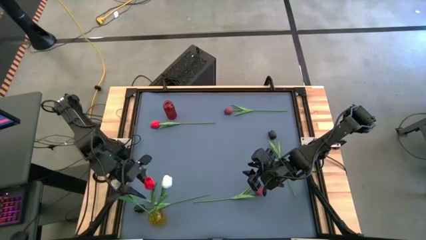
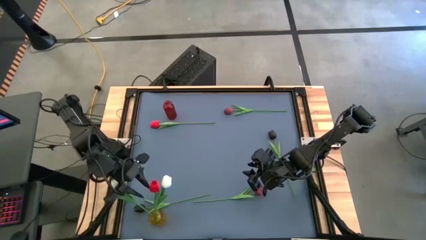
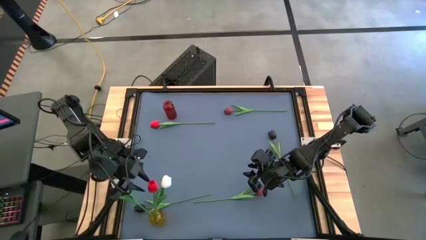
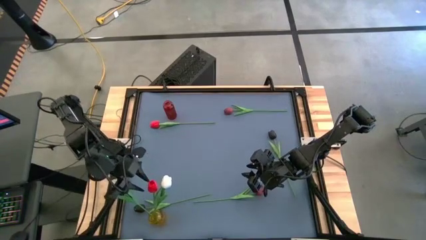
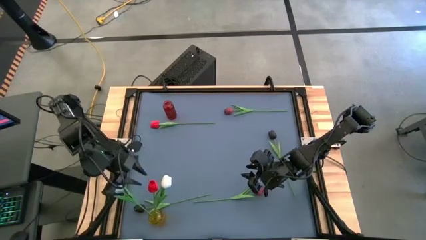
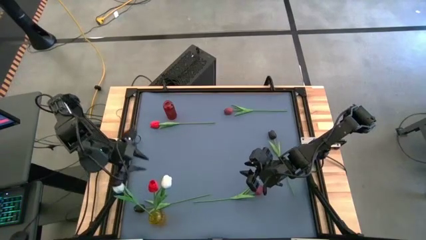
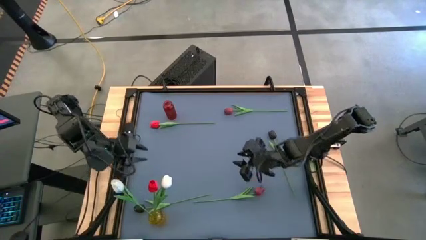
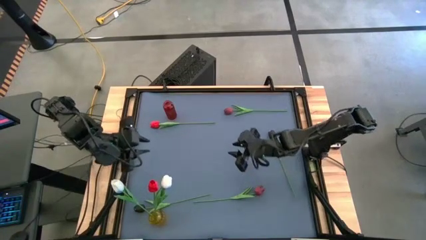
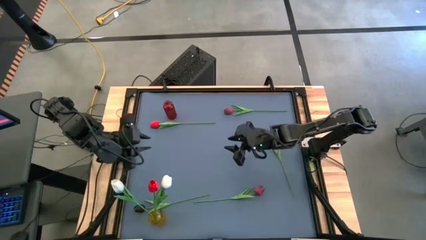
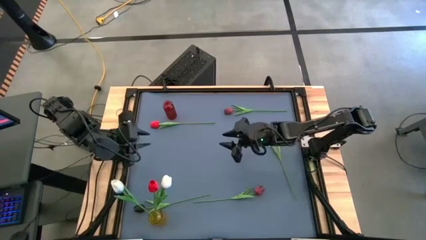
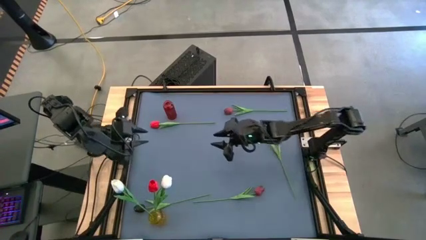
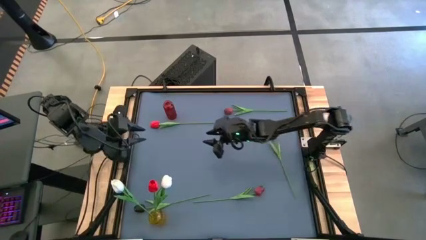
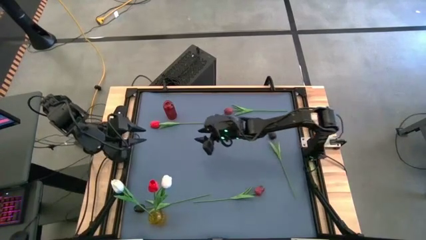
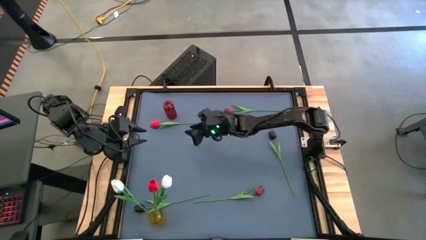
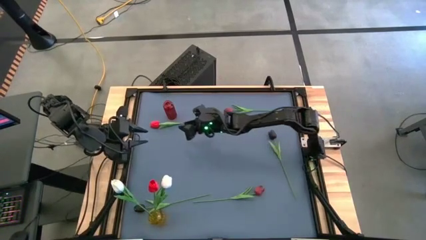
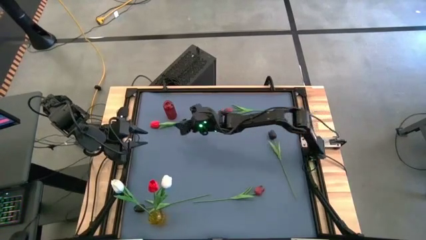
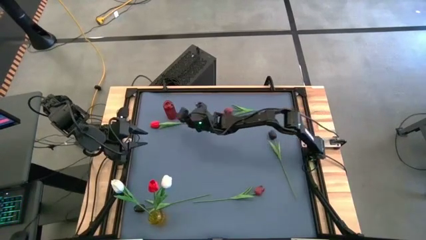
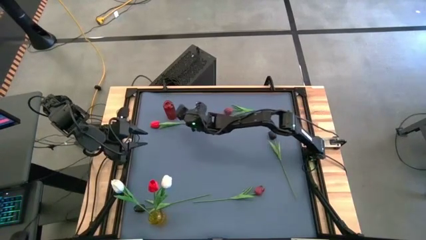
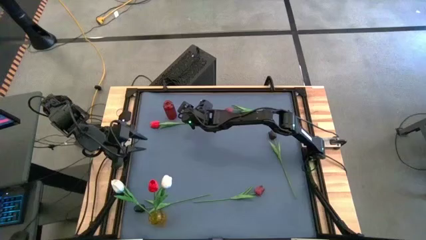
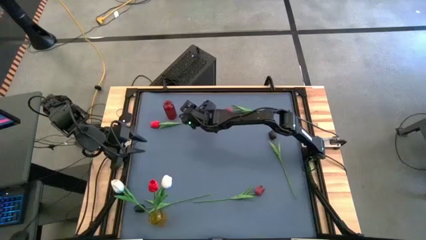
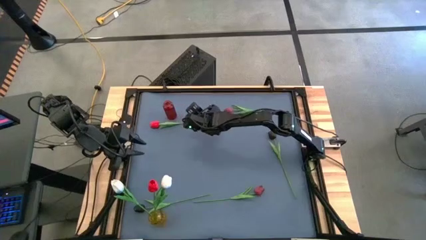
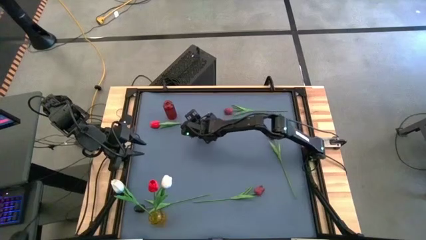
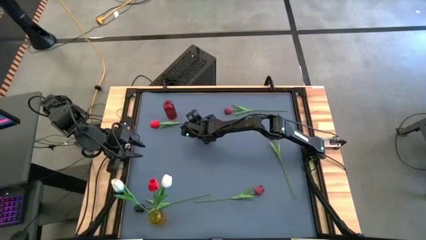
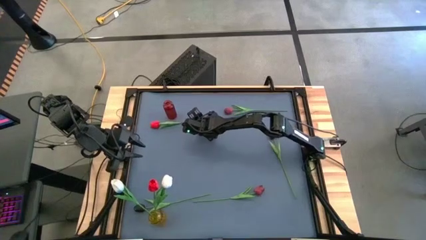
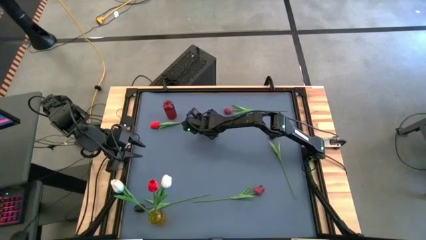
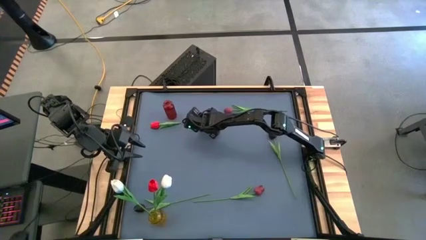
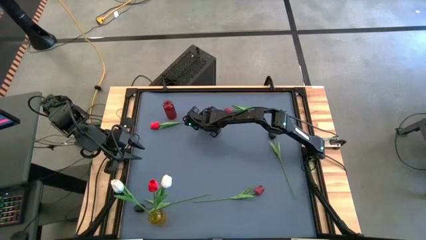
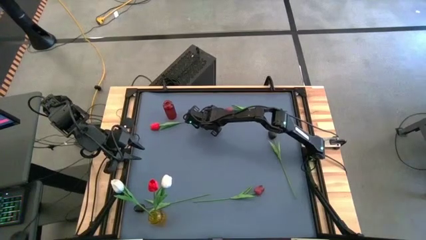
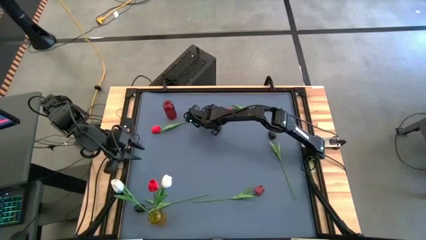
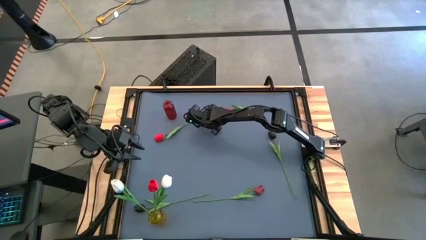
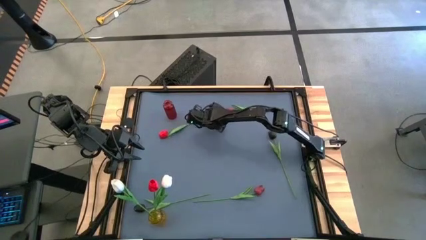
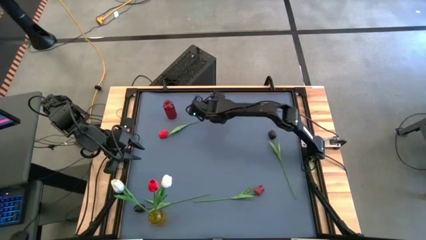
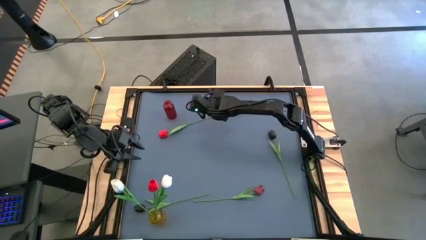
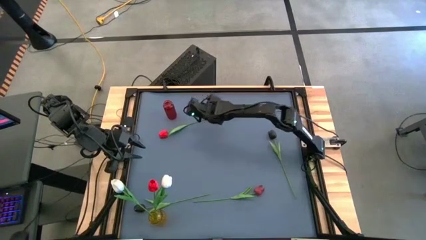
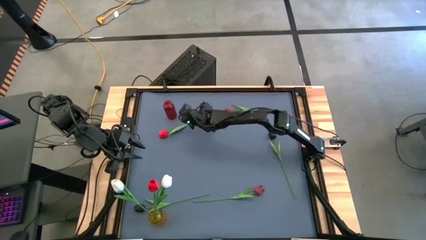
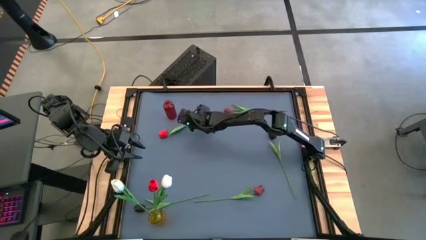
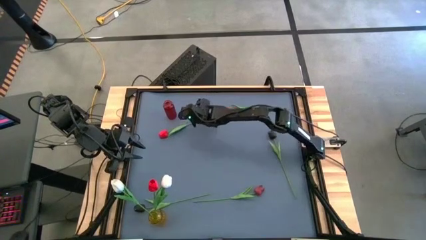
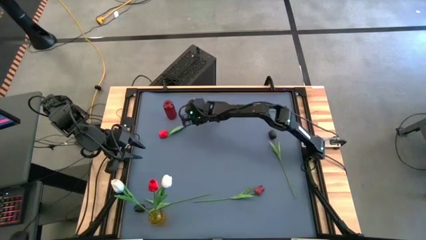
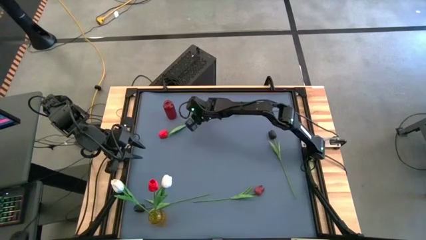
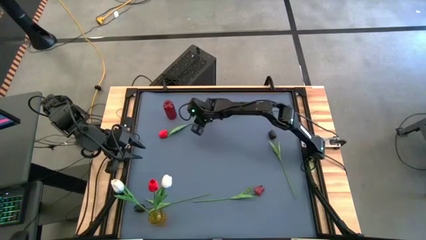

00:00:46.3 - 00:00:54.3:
Task: Sort flowers into vase by color
Put the red tulip into the yellow vase
